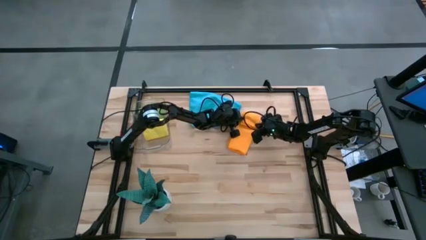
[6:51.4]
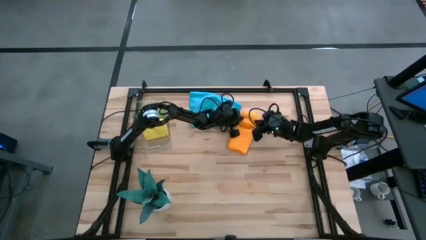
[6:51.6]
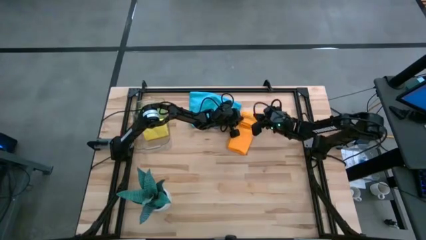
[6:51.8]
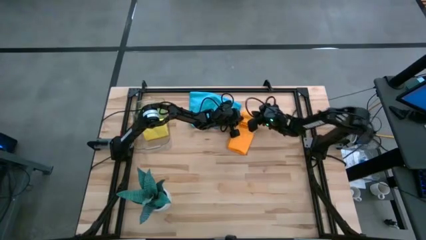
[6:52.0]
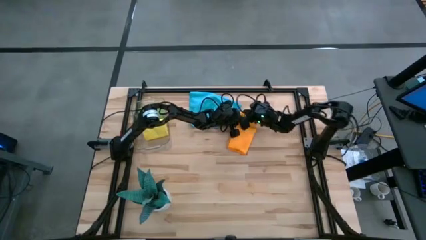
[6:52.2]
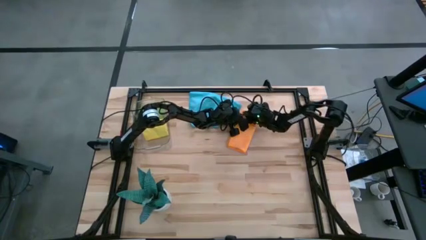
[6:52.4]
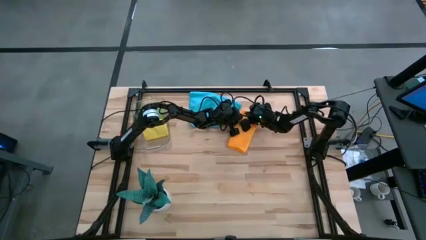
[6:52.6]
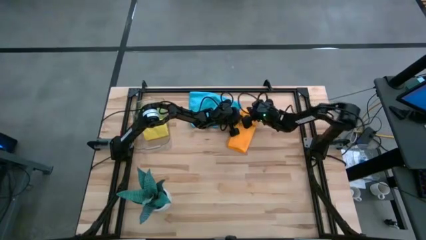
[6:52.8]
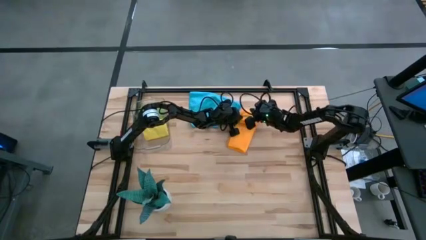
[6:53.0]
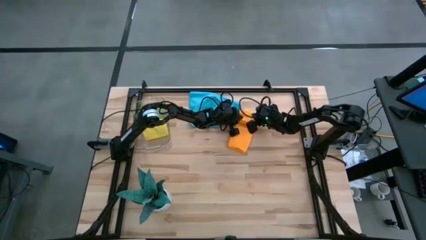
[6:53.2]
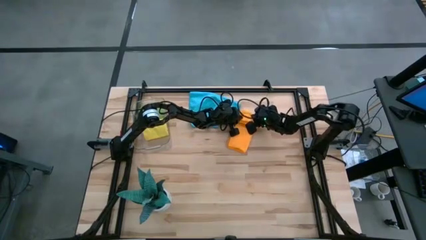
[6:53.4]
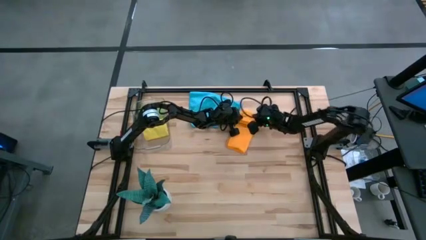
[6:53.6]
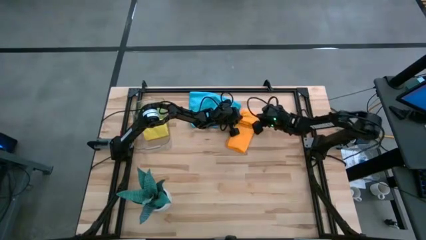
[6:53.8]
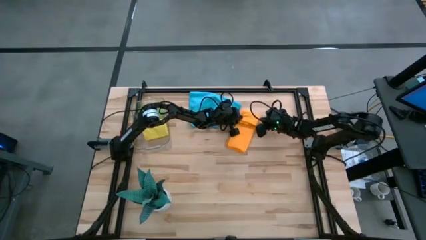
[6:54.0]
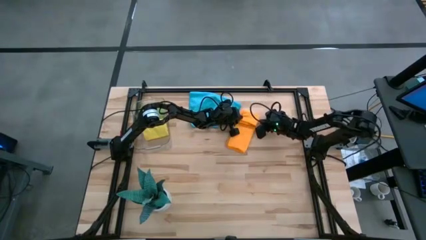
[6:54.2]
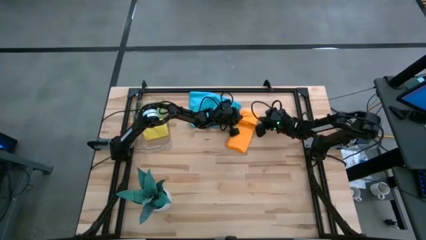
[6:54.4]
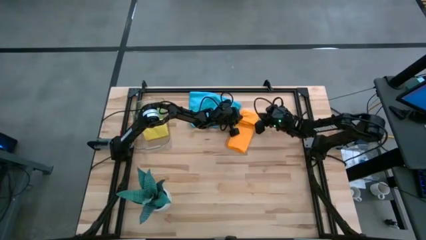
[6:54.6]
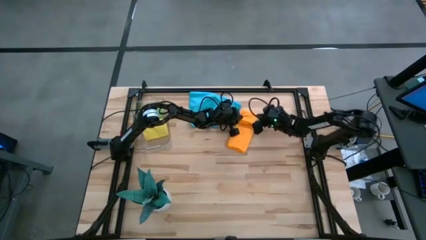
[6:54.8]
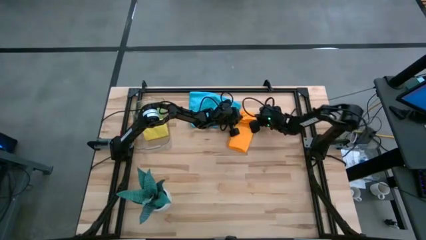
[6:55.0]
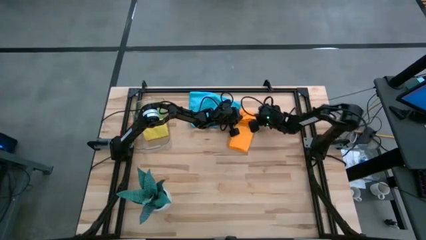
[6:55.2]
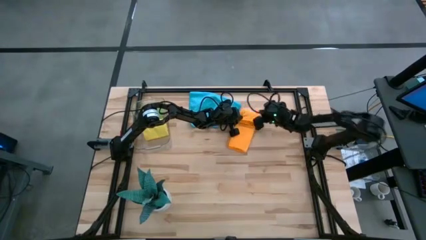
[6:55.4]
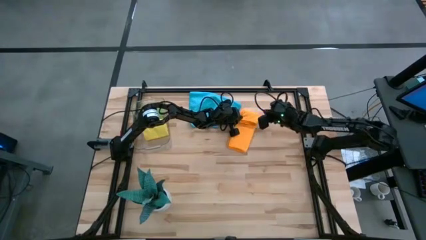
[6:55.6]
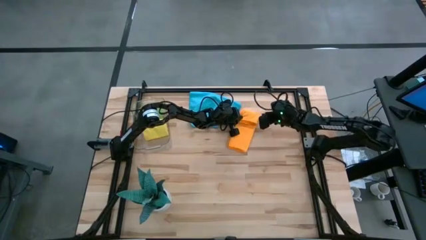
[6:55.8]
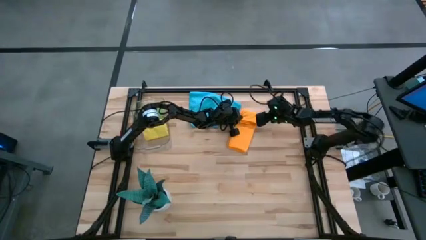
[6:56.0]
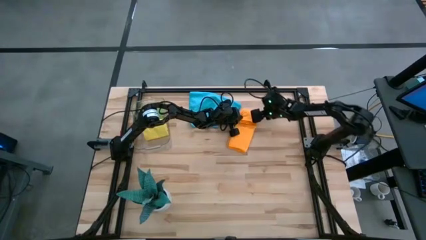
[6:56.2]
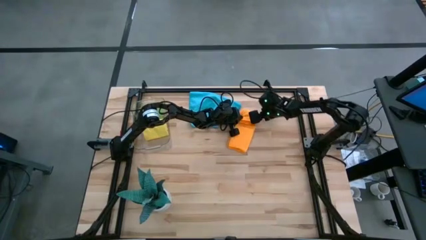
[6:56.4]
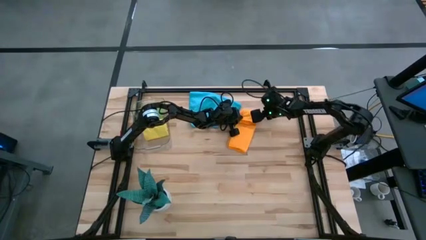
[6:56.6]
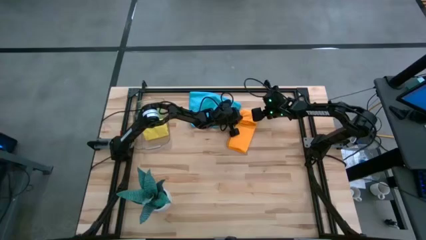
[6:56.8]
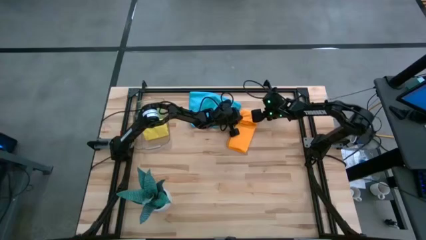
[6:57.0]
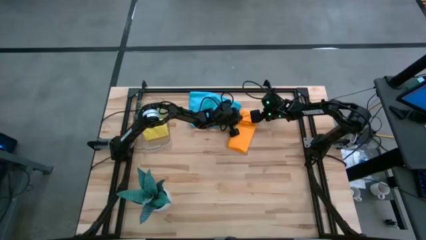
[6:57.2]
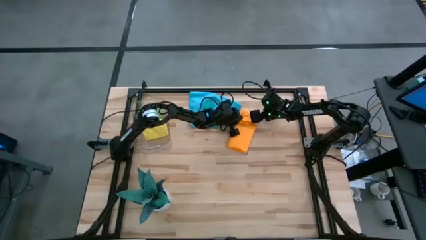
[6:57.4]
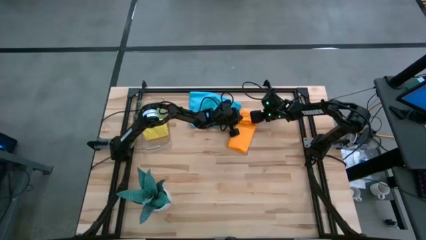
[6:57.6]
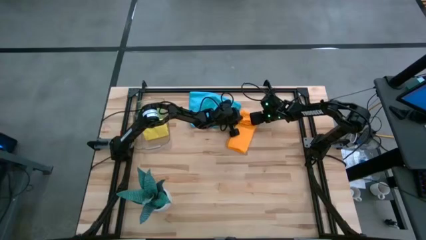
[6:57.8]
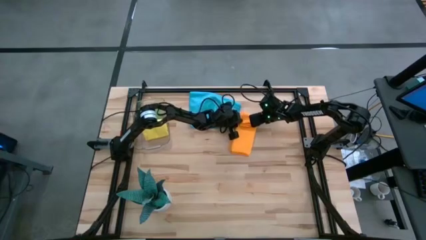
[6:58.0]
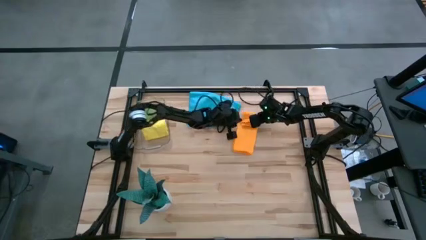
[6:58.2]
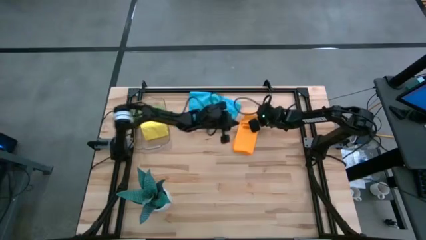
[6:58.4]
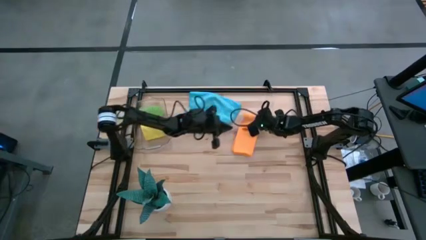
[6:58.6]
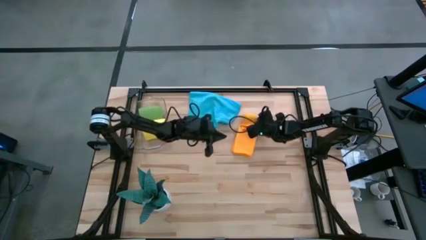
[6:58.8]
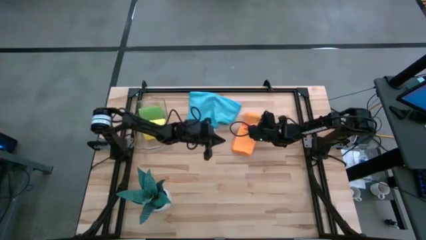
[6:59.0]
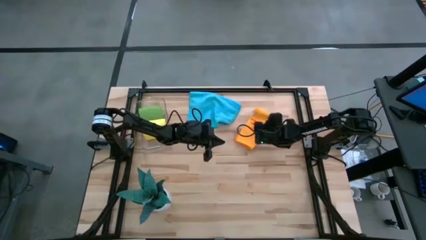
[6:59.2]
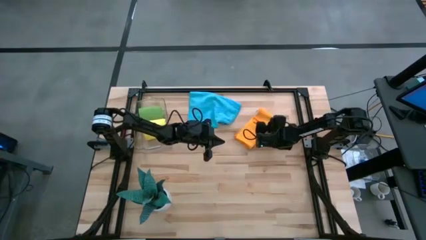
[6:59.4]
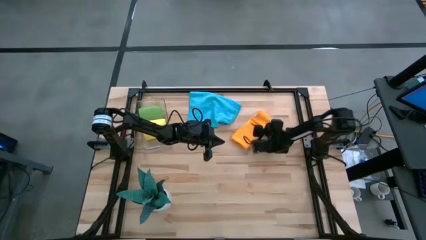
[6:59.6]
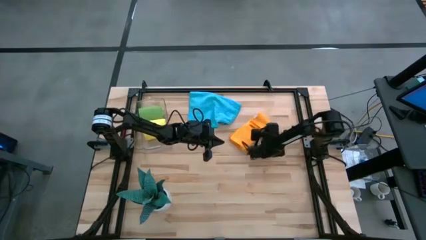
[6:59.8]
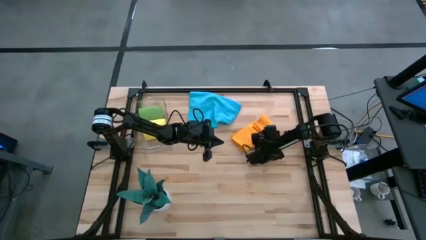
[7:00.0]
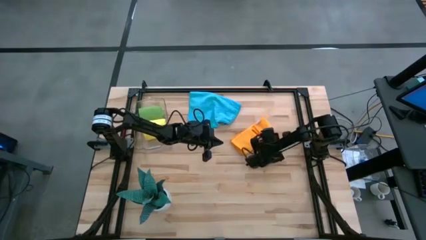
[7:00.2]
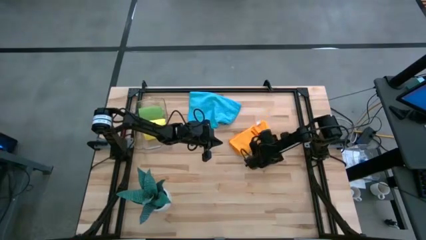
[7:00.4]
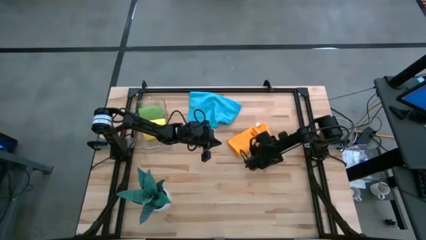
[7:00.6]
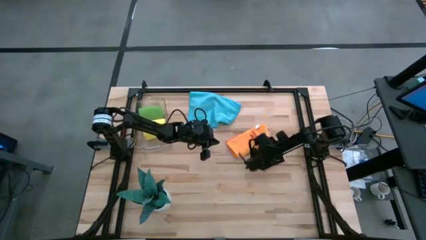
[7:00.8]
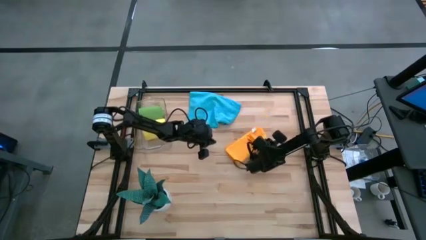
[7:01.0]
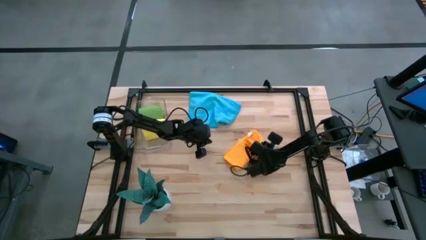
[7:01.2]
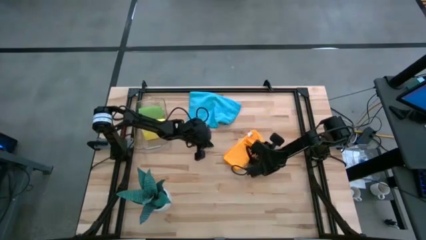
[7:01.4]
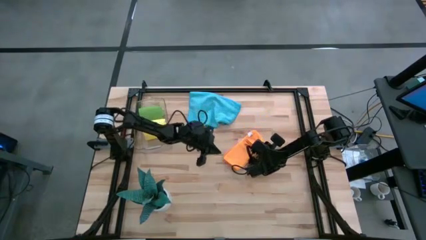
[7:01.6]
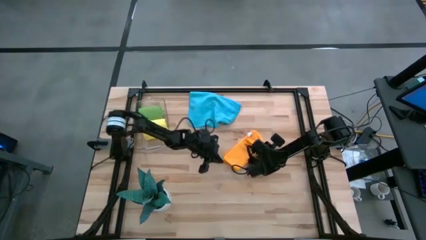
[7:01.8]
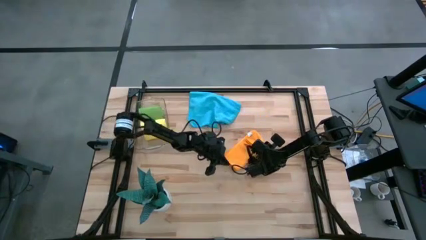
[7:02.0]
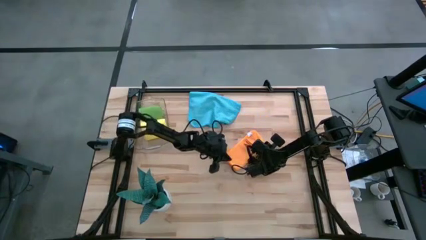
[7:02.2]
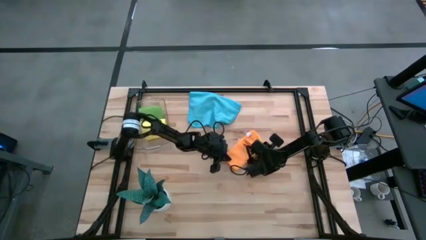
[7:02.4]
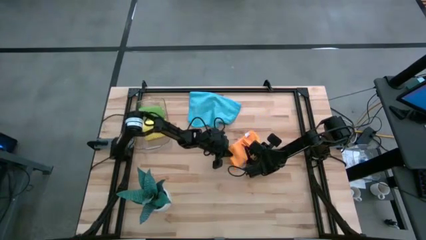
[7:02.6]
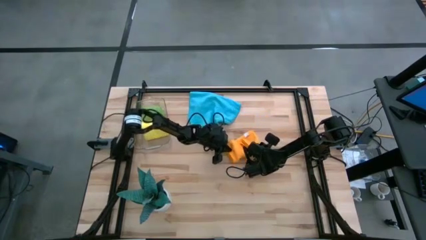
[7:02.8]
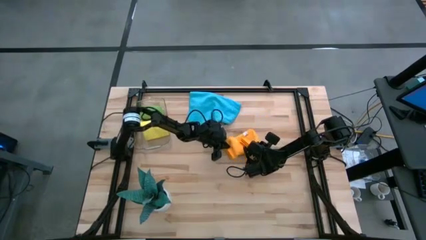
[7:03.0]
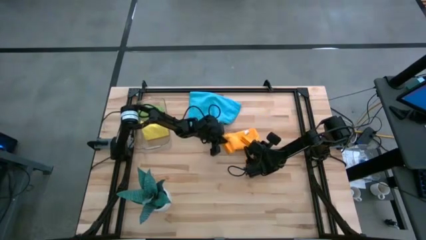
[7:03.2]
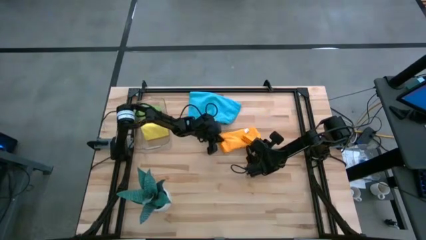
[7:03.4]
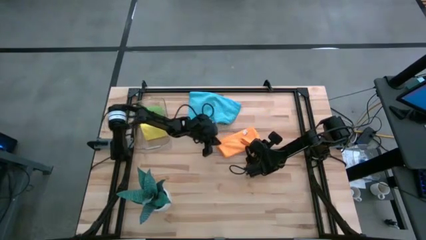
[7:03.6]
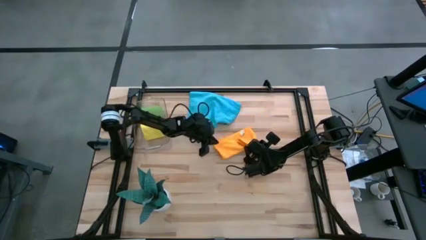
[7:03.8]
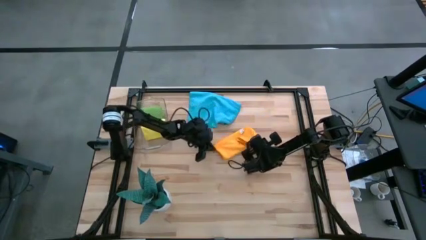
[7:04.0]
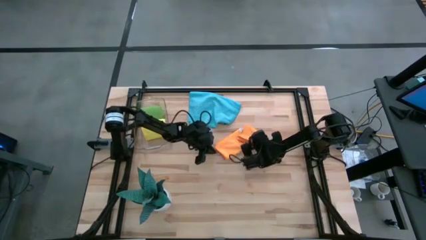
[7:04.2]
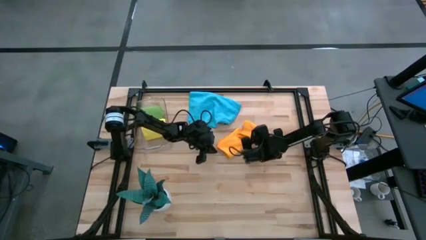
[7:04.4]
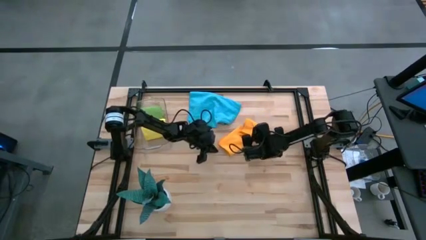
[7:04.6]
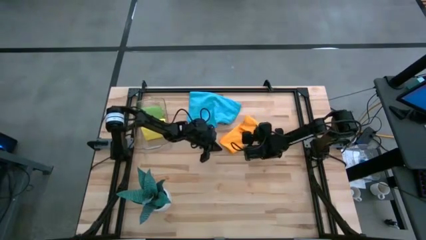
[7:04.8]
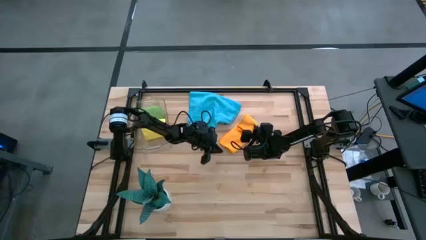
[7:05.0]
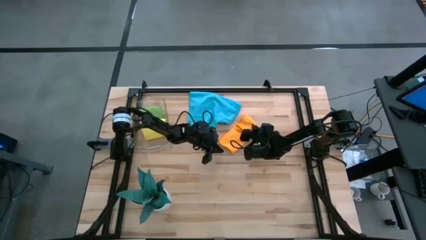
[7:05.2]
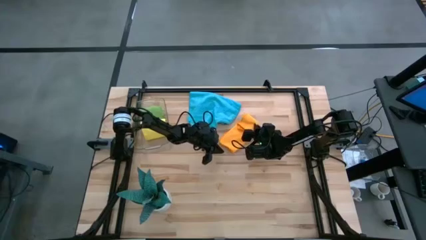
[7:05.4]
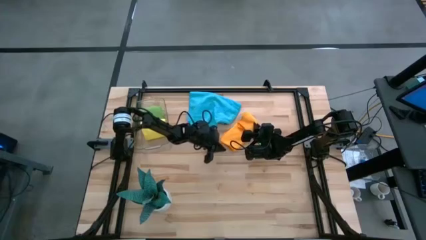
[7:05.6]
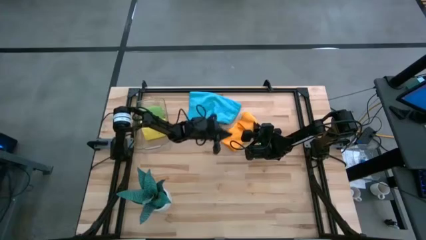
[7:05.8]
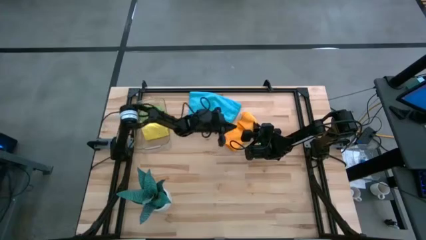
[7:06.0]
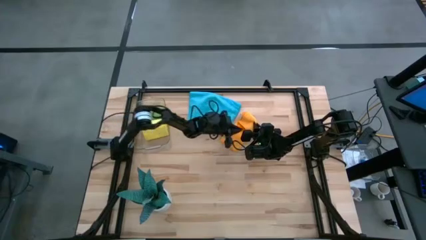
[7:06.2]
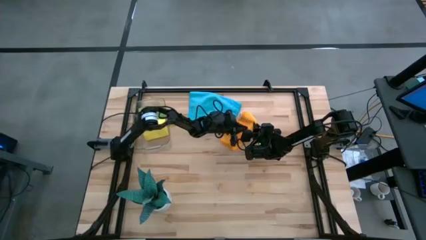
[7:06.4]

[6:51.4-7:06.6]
Task: Roll microfiber towels into tight, uniform cylinder then place into a basket
Roll the orange microfiber towel

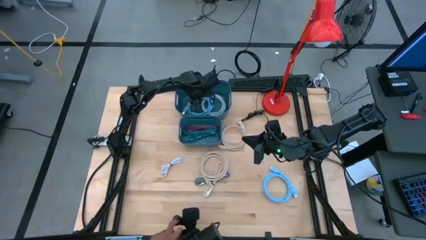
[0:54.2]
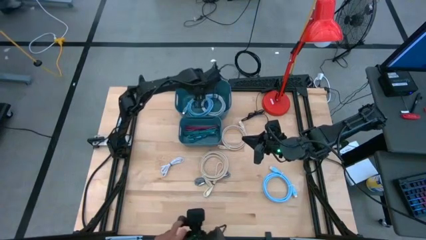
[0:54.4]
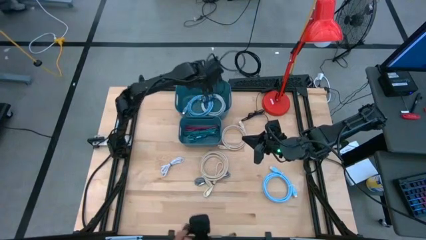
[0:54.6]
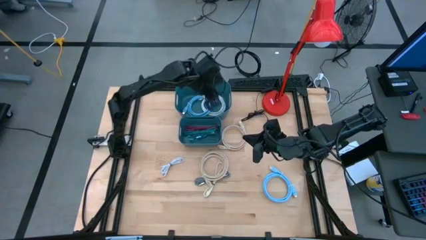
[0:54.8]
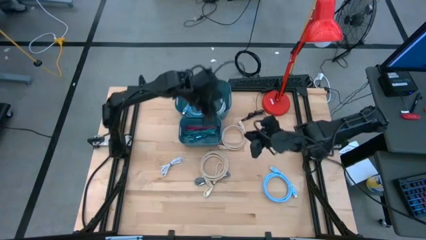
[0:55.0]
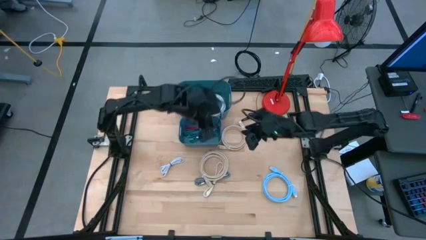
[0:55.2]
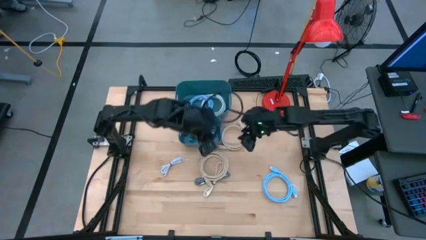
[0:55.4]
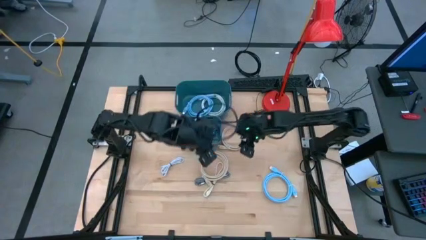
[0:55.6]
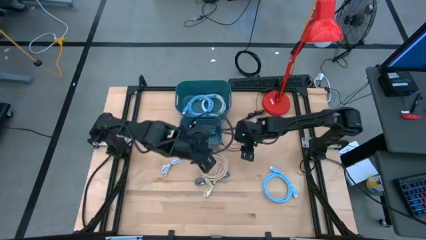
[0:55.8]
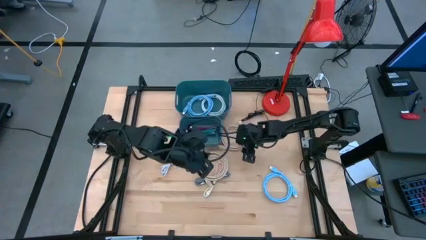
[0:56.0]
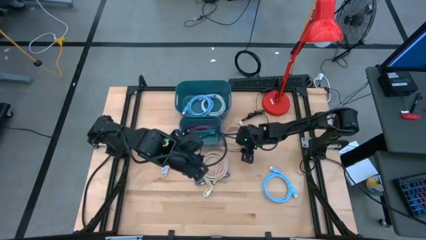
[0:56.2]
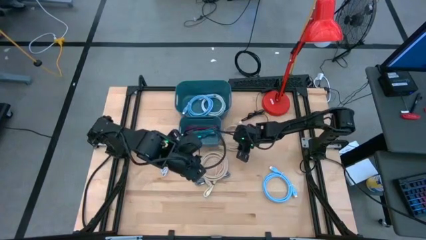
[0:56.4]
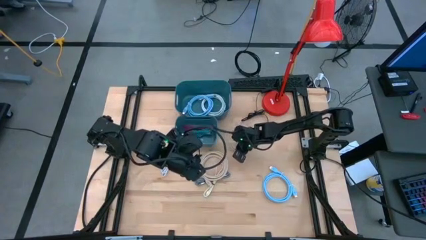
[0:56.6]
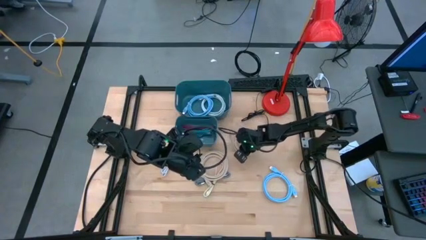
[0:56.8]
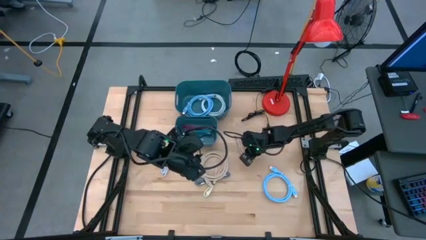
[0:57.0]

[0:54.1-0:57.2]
Task: Pick & Place USB Port
Put the top brown HDMI cable into the top blue bin
